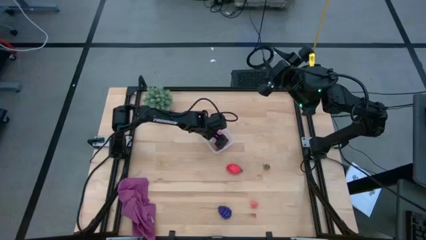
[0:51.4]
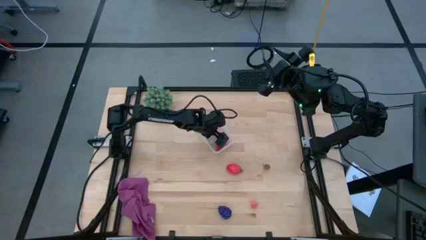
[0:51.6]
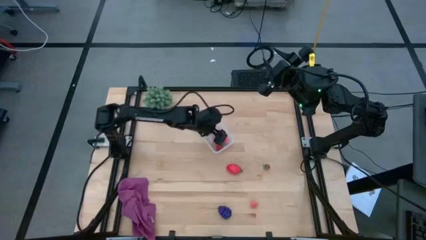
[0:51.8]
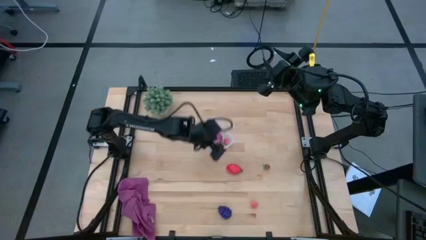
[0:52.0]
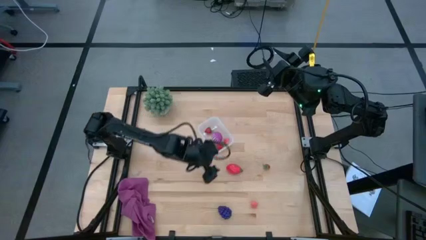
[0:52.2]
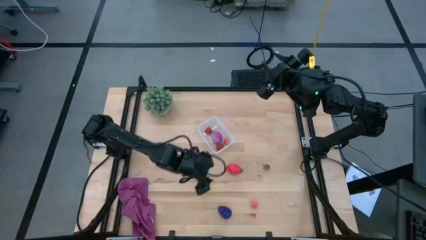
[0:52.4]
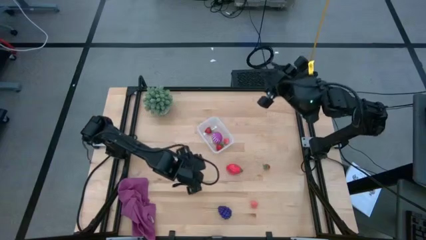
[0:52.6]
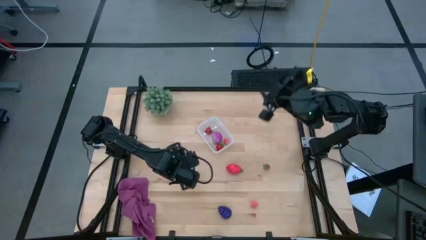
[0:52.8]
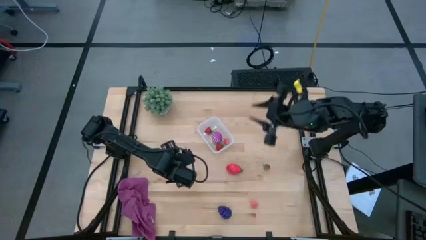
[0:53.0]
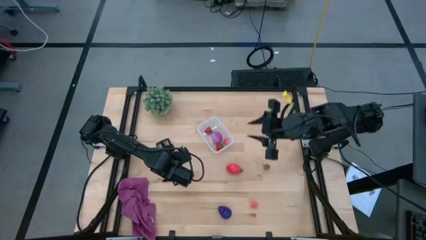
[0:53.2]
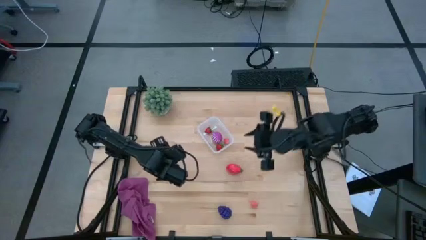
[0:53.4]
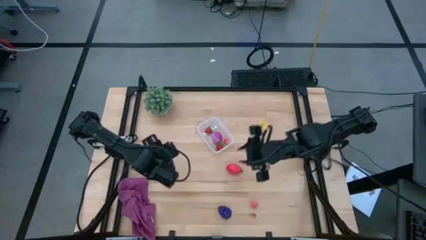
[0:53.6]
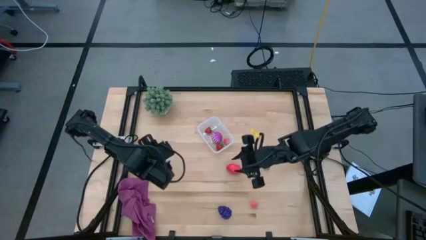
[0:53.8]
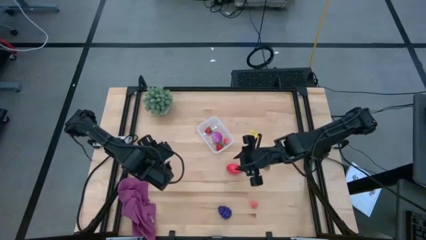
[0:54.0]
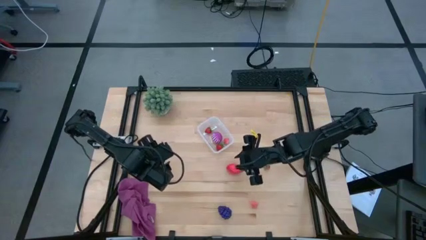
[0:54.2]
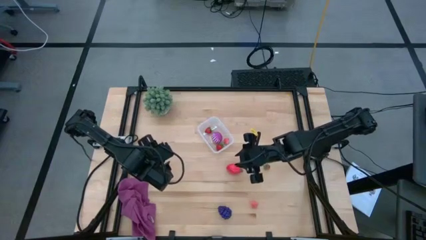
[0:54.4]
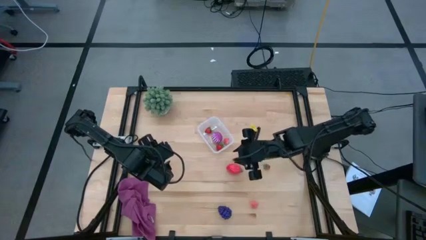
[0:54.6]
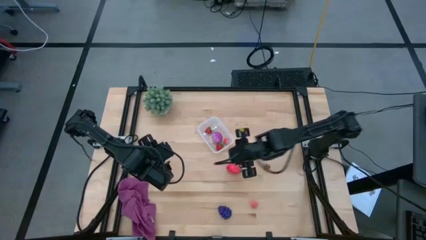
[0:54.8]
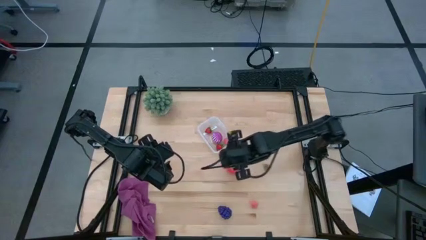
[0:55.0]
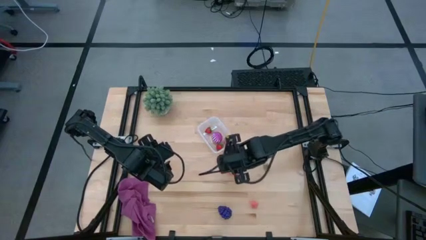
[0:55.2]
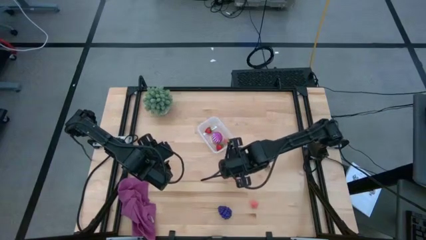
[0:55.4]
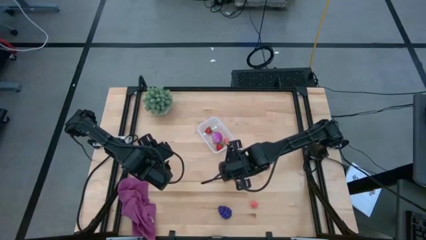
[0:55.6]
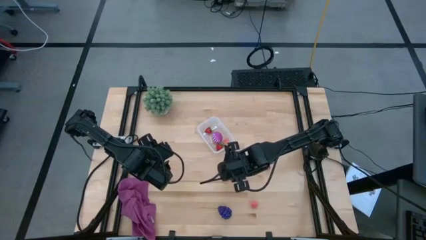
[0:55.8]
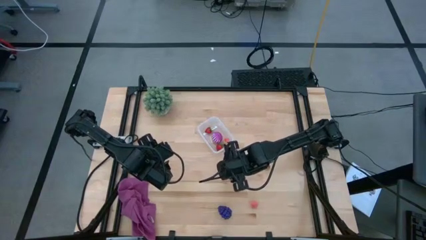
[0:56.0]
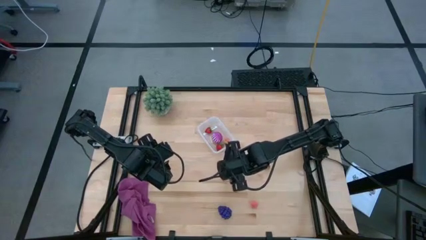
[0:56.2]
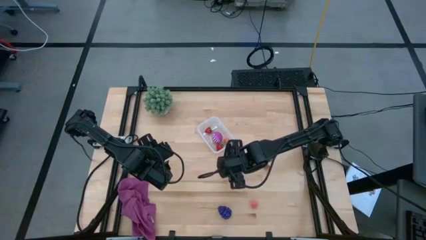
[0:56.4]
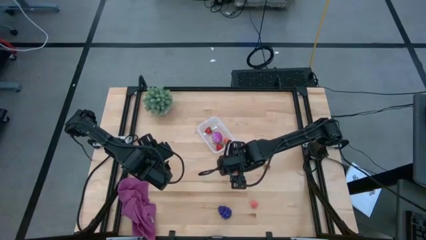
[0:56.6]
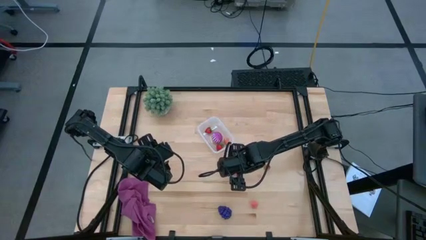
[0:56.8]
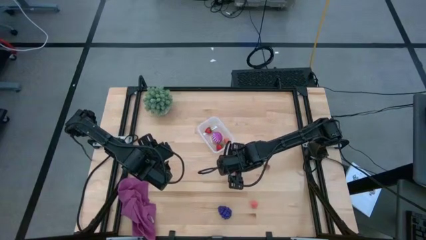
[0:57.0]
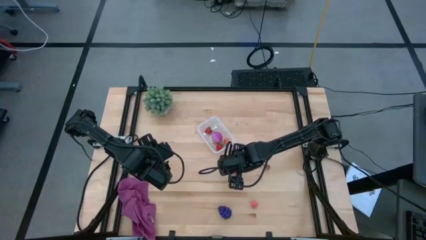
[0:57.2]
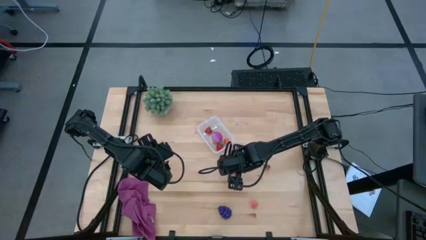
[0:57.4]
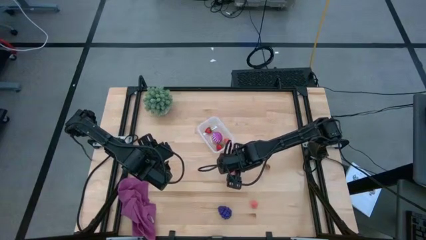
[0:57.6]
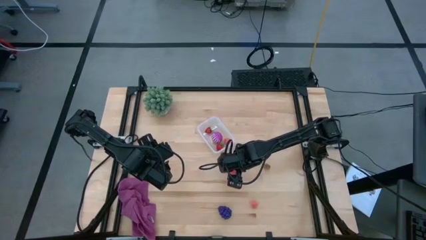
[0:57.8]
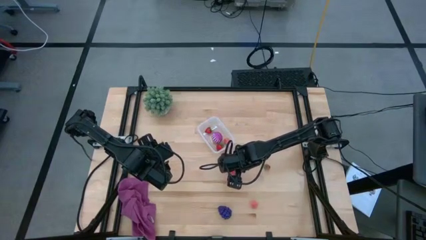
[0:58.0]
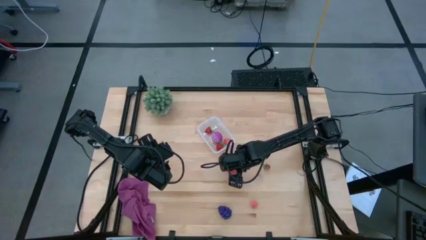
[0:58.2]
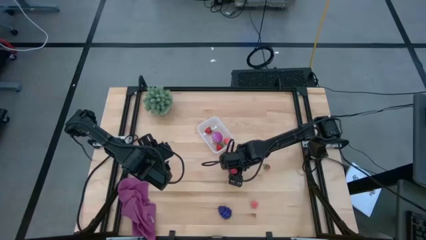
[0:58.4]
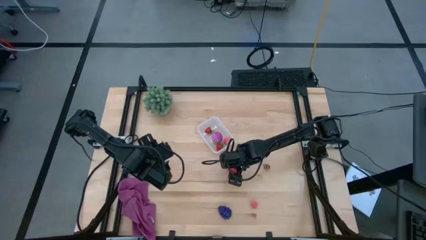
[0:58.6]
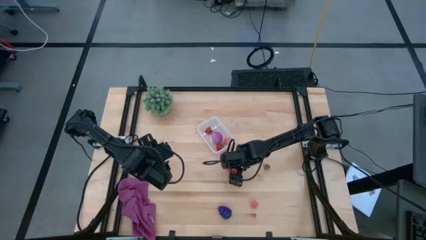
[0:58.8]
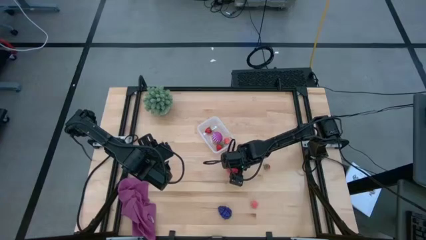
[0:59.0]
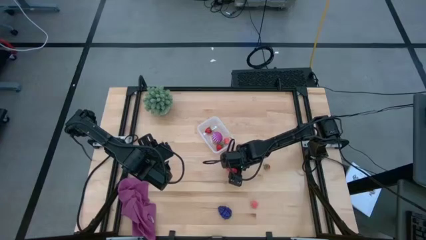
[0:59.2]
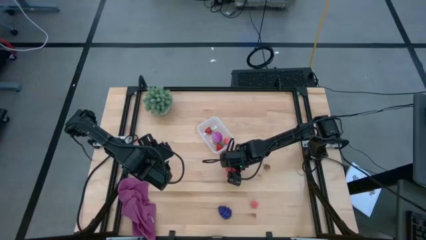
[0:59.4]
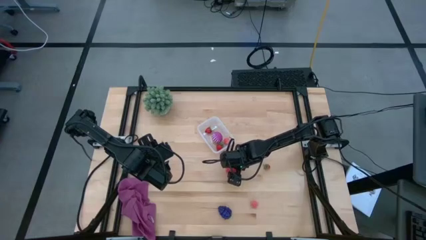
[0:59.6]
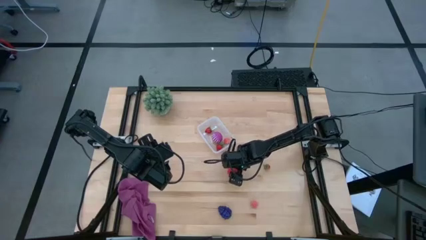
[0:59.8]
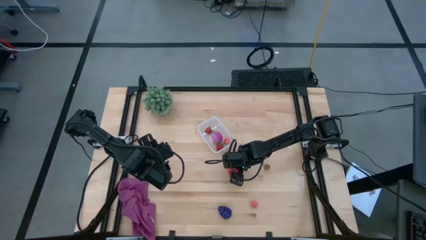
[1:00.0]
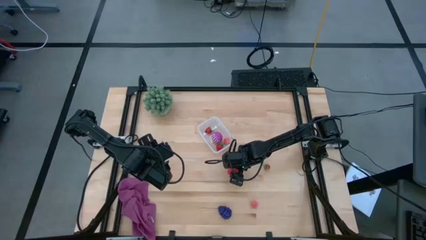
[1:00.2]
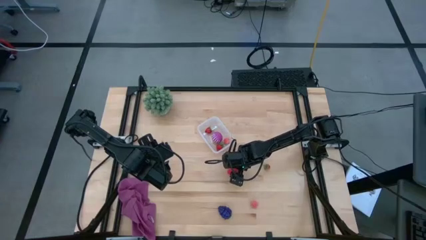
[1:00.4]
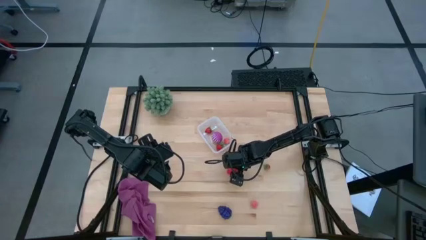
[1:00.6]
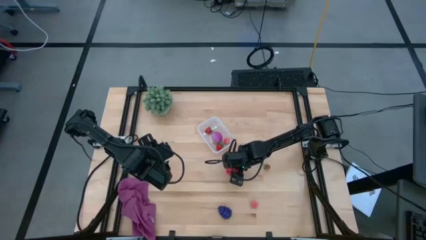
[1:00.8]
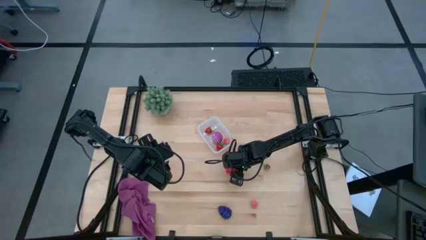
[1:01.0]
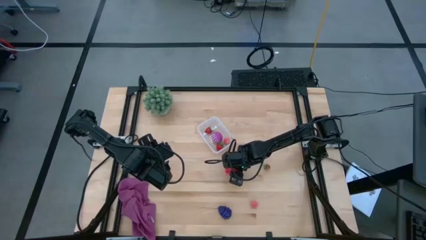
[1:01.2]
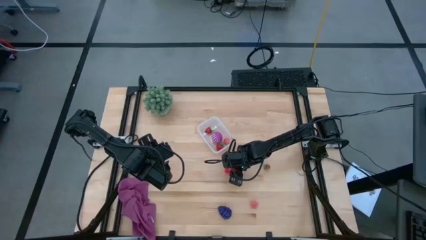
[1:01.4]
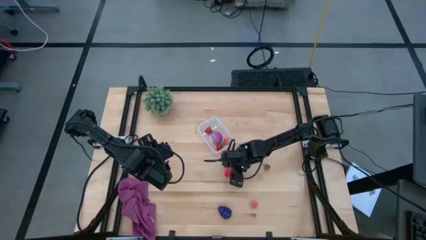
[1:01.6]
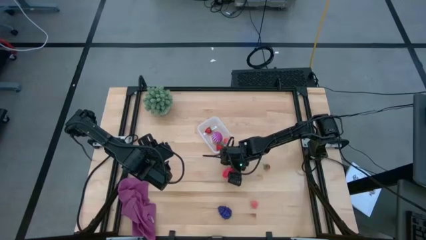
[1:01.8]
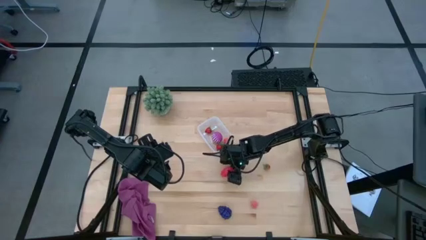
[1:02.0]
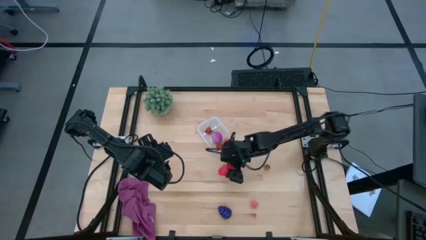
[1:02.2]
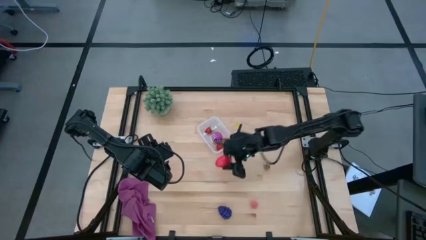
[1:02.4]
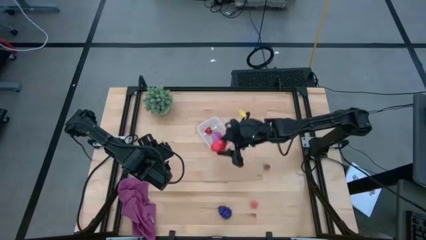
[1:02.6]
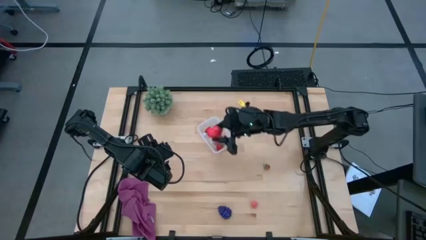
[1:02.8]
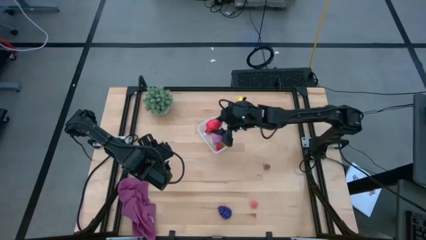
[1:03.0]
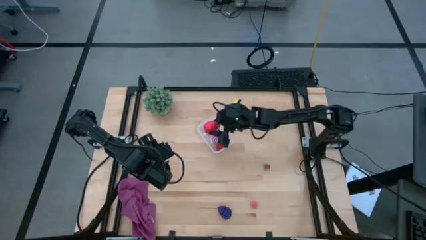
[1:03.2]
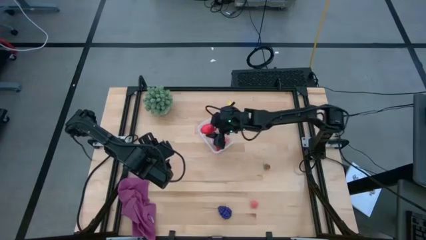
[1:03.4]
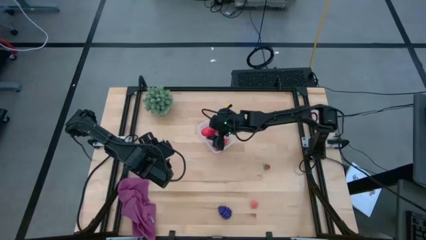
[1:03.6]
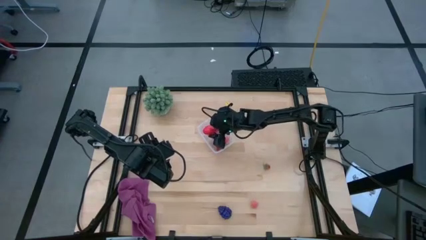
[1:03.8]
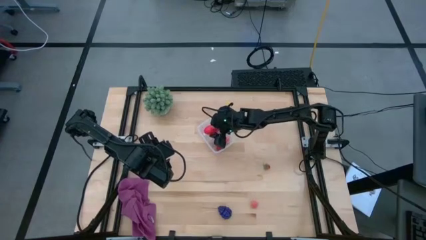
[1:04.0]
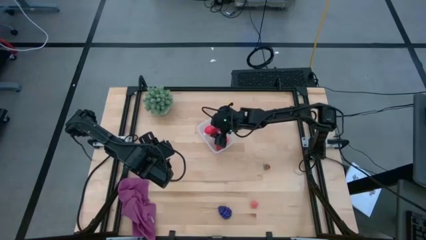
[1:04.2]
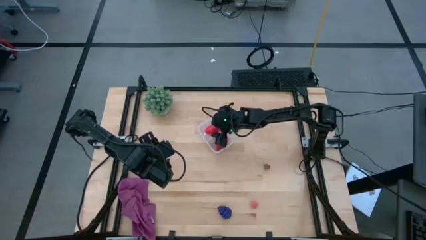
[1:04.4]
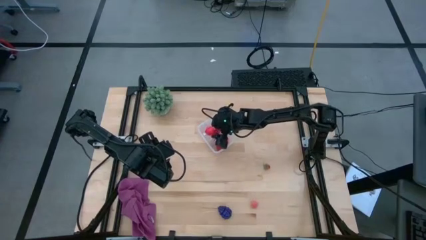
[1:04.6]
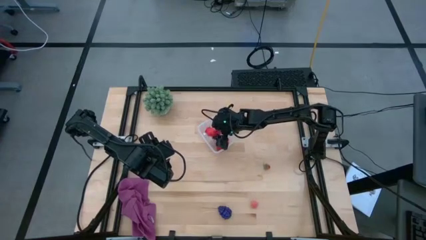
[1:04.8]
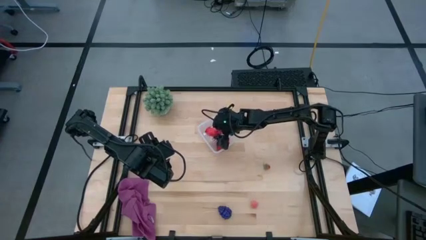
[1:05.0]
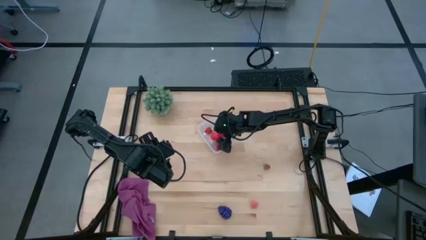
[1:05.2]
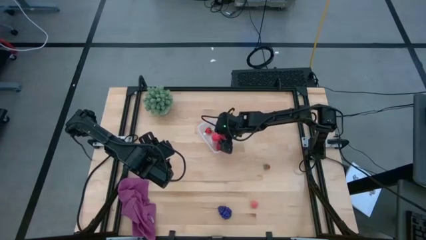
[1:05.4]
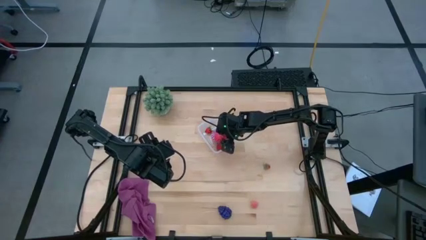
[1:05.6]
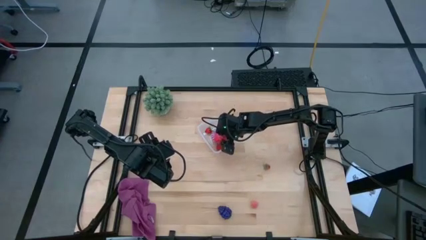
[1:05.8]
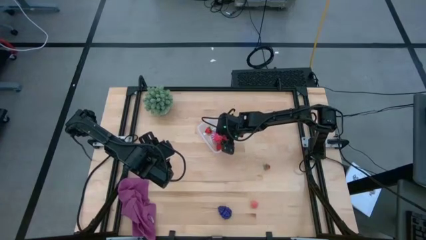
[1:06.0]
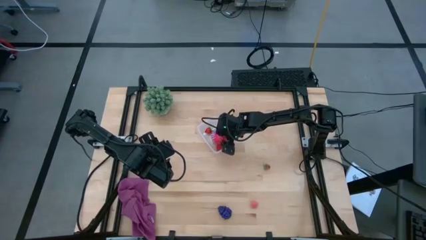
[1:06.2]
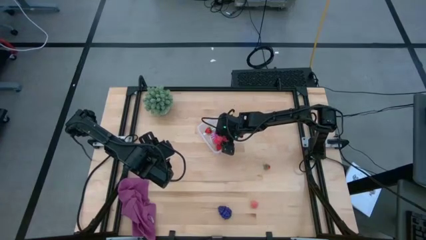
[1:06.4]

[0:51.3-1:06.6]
Task: Pick and placing Produce into tupperware
Put the dragon fruit into the transparent bin
